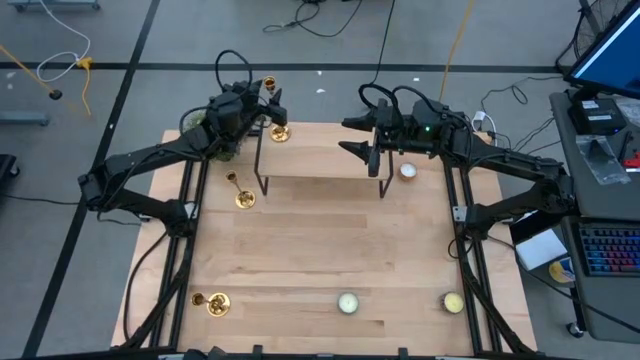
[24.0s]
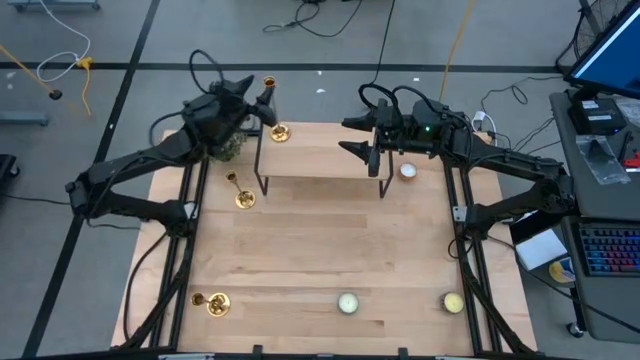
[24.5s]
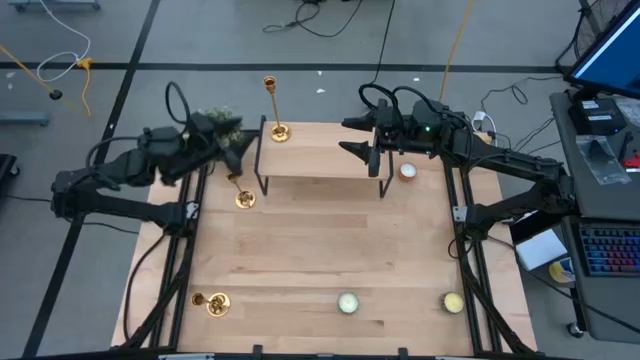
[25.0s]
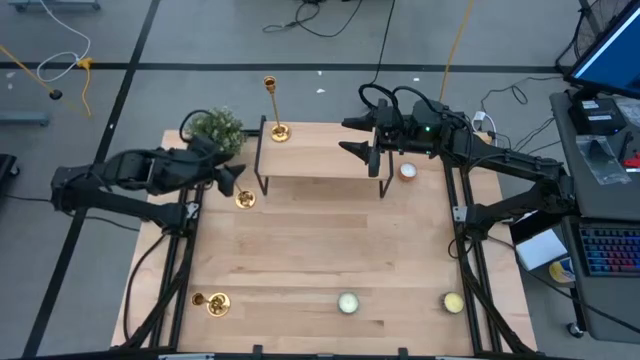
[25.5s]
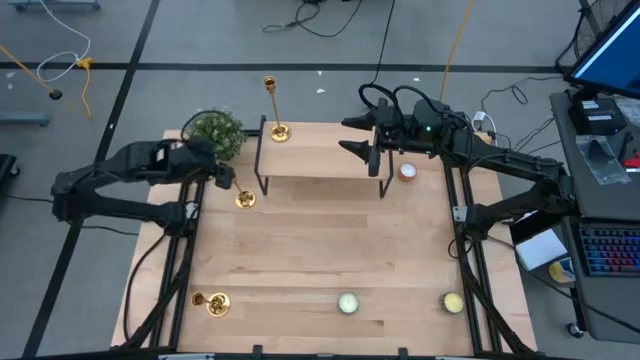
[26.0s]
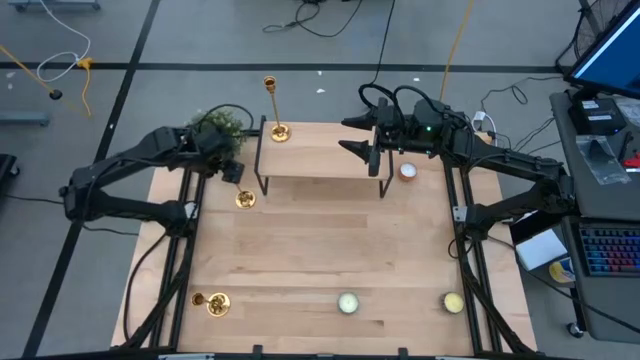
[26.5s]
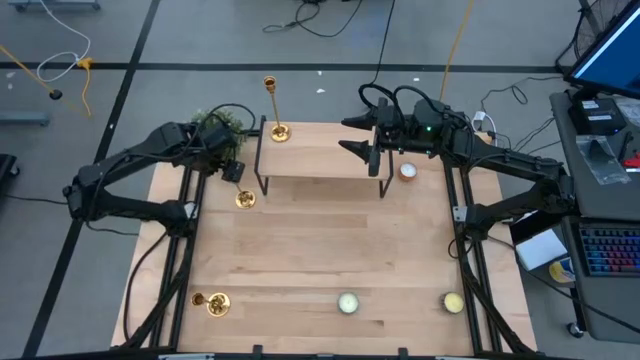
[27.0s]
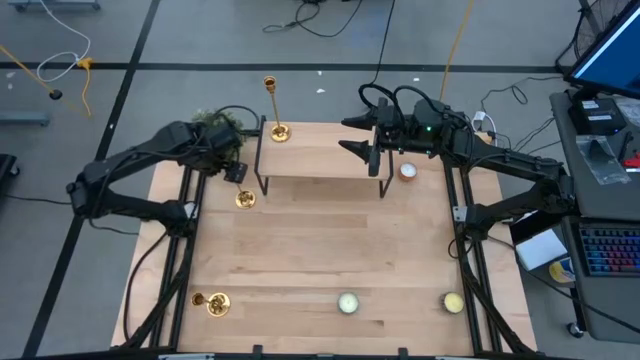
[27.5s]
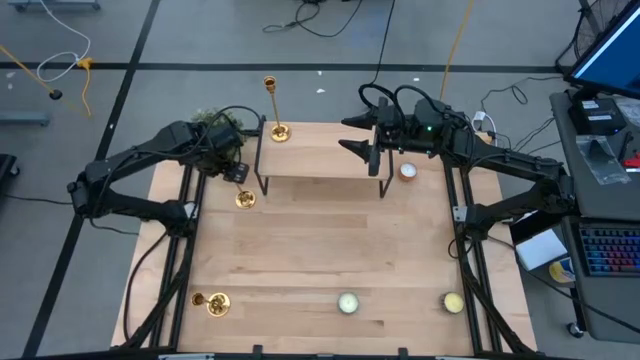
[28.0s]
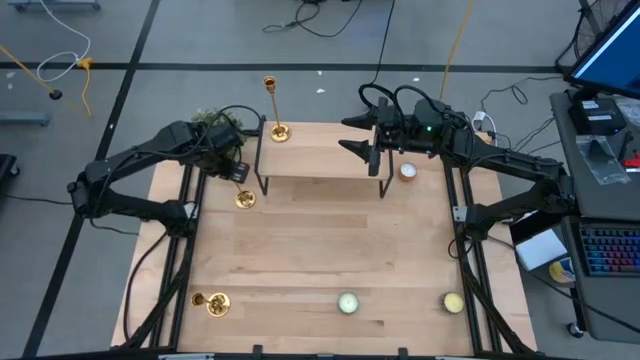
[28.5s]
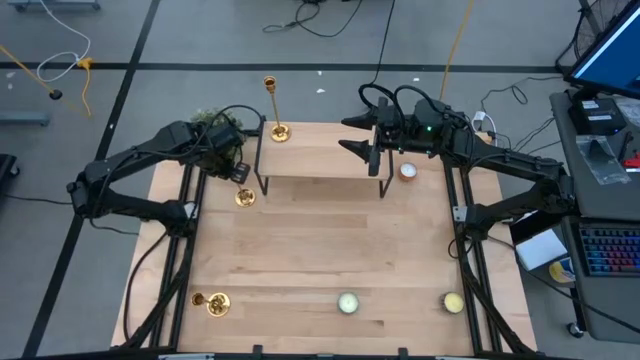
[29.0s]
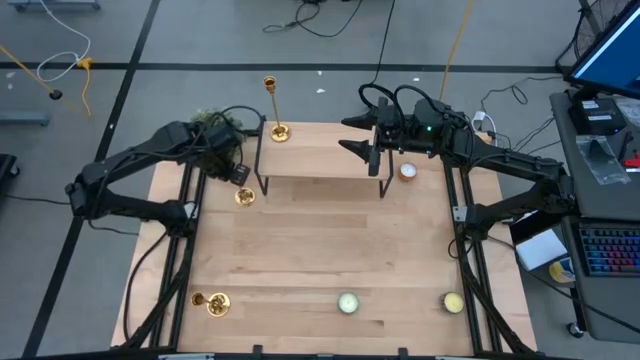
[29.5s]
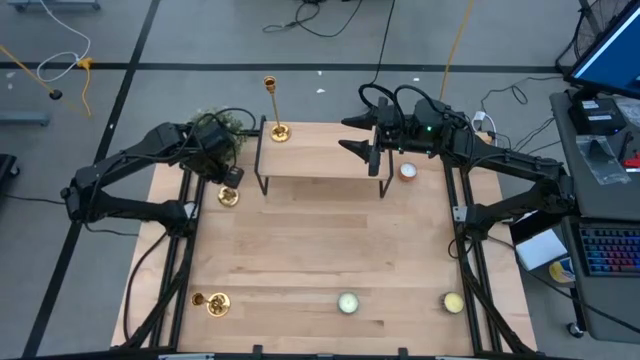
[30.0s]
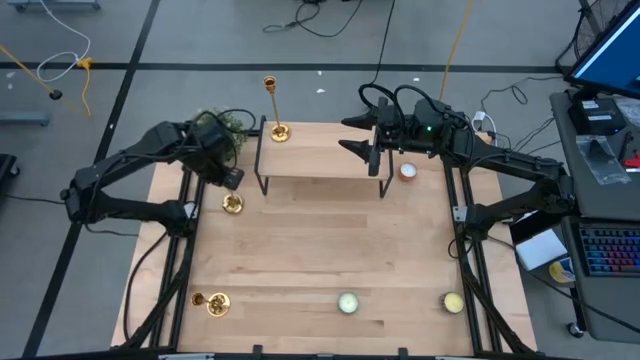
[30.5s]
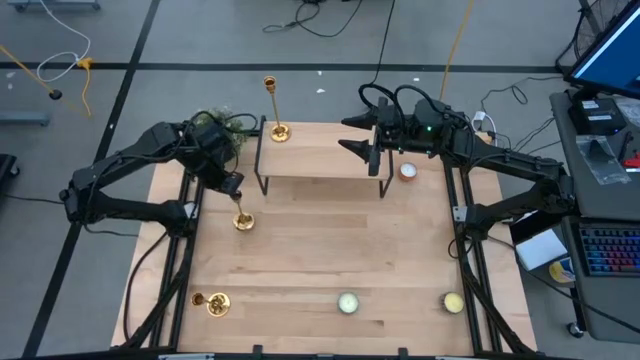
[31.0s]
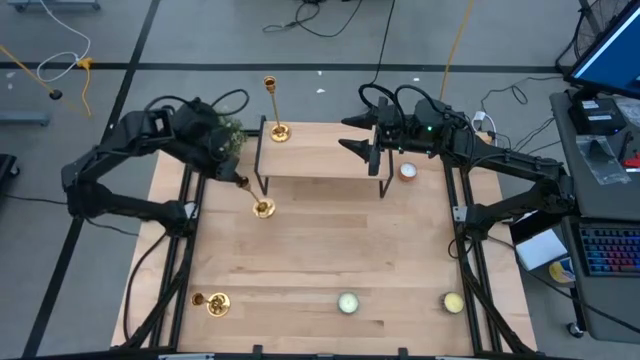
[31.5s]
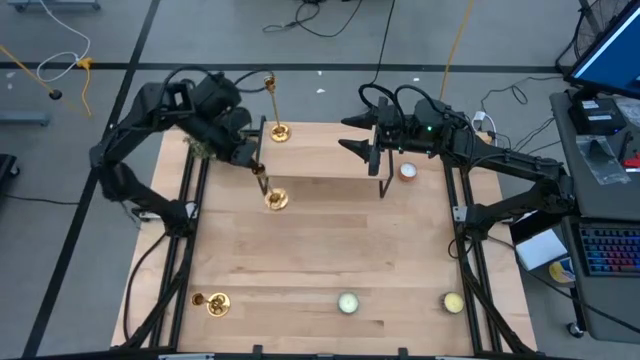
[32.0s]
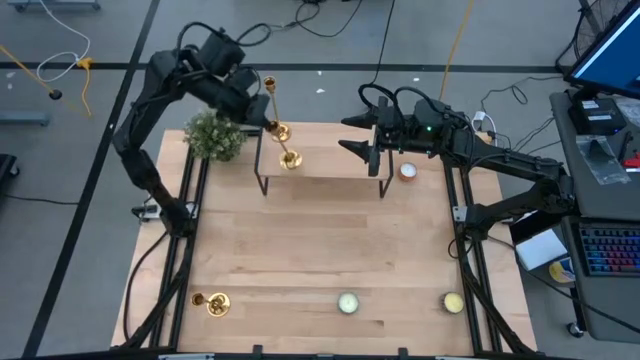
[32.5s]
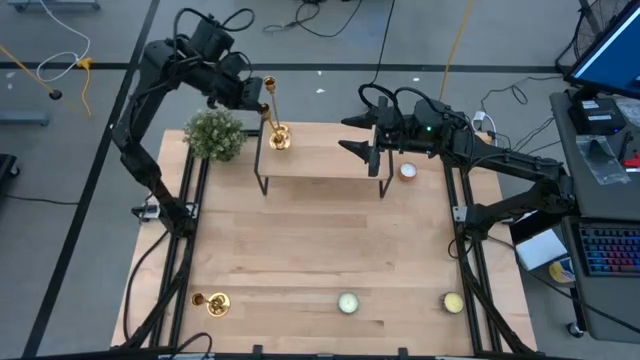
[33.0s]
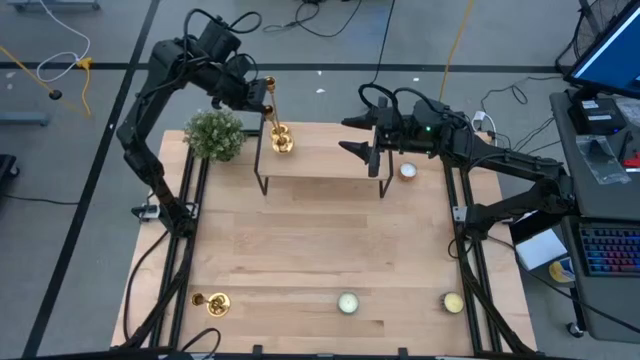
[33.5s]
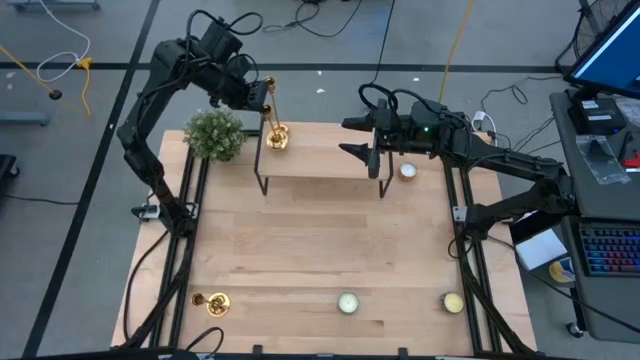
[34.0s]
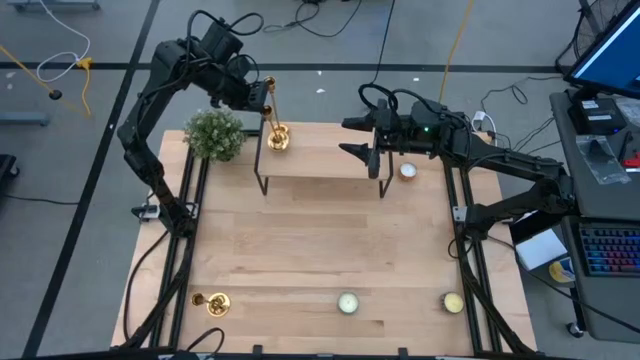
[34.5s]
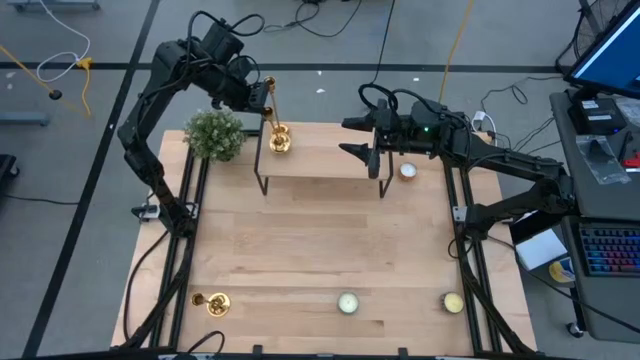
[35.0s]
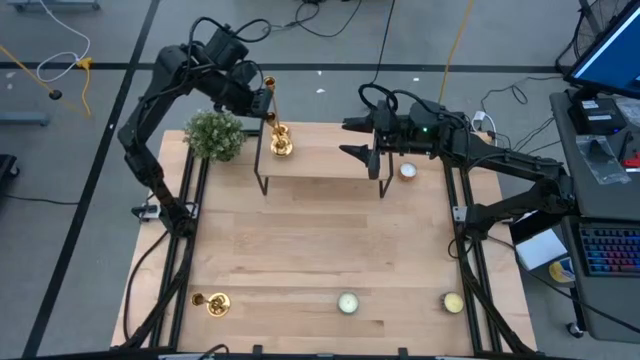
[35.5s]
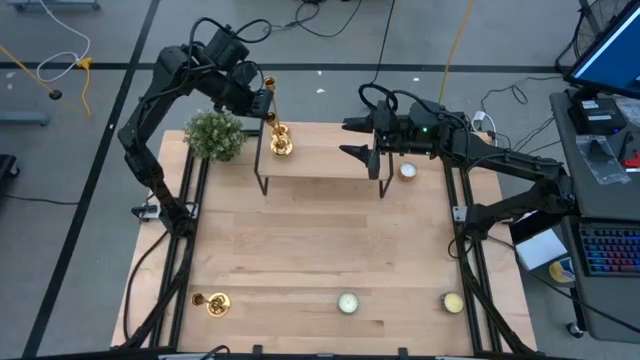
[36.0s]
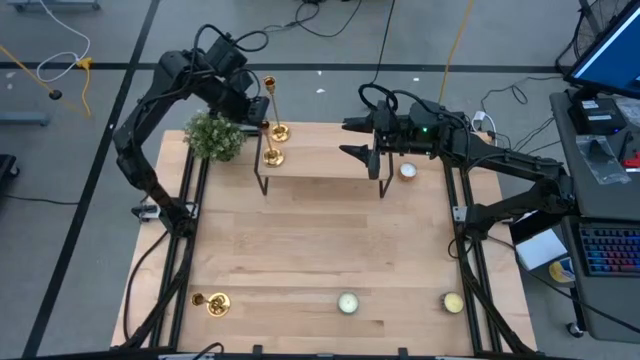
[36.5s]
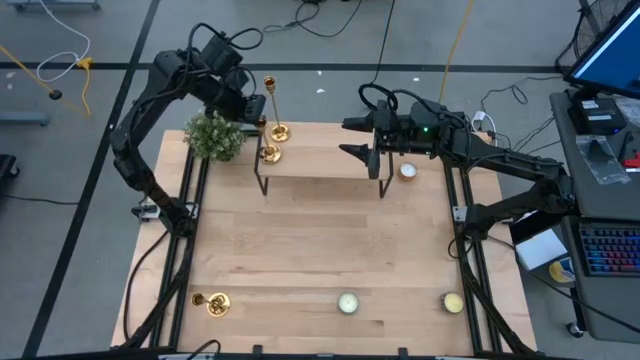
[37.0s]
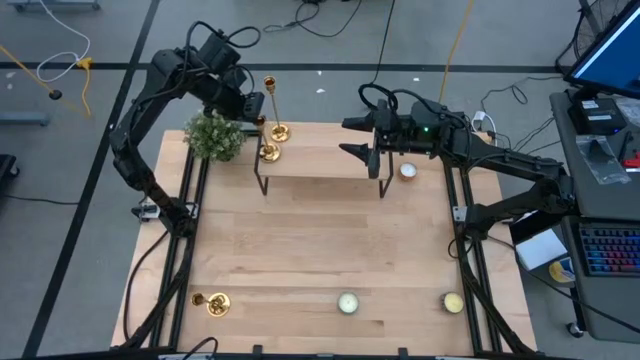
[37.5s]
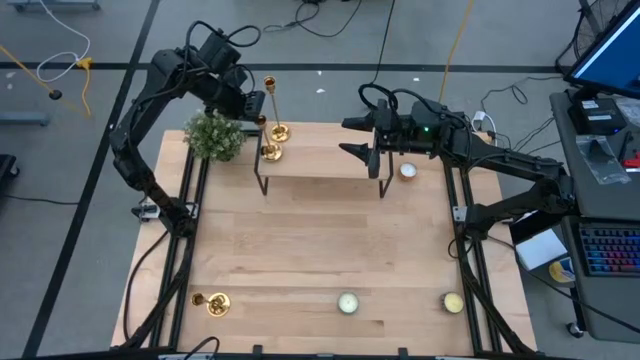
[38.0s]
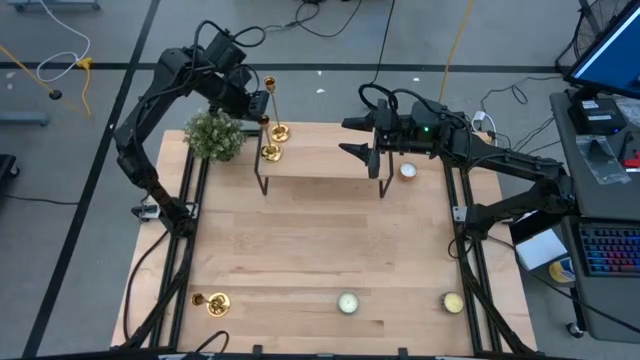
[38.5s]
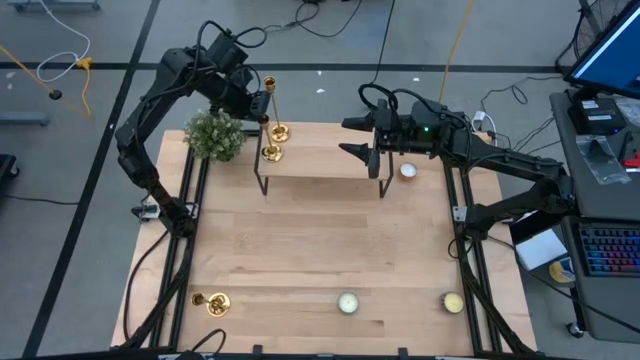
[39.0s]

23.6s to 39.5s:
Task: Pick & Place candle stick holders
Put the top gold candle holder on the shelf
